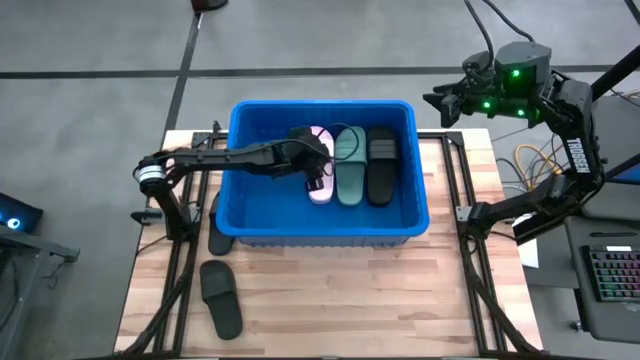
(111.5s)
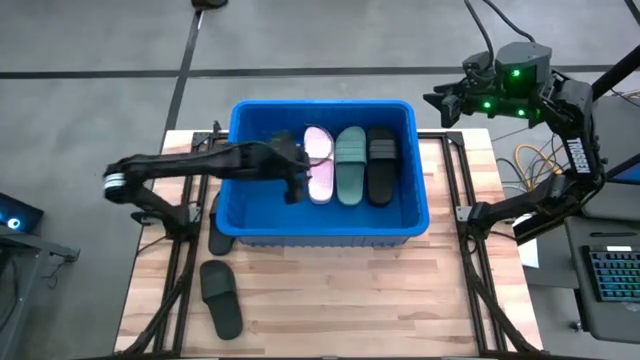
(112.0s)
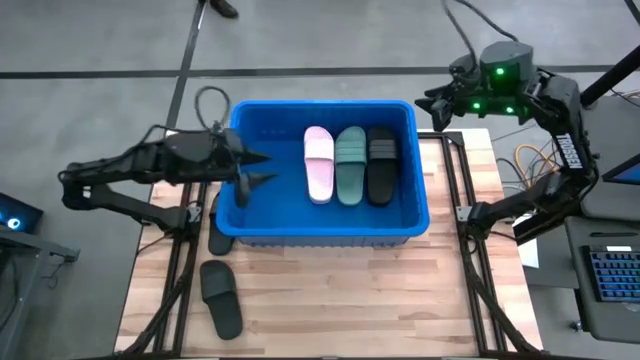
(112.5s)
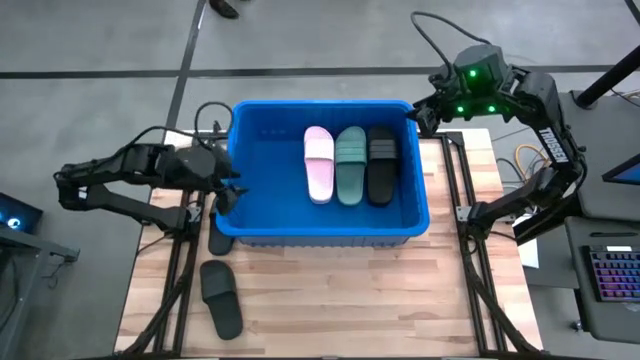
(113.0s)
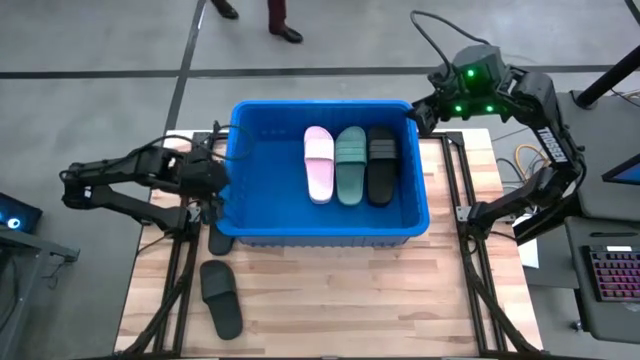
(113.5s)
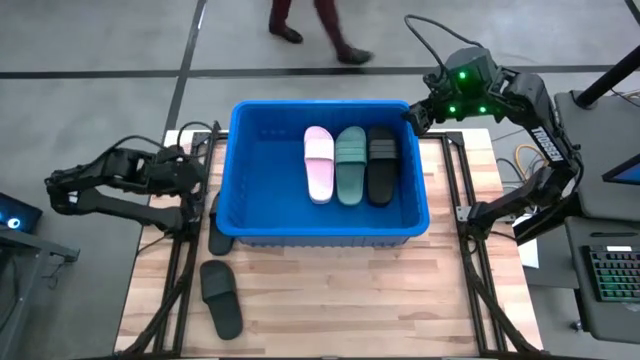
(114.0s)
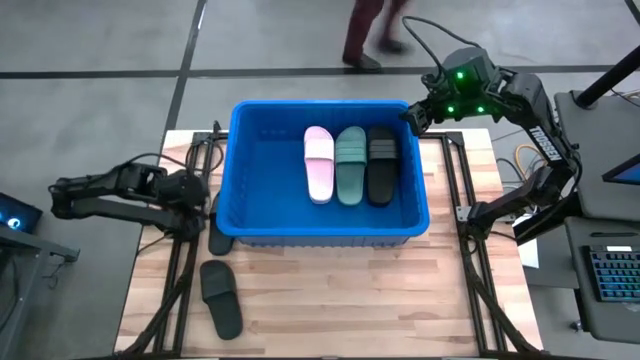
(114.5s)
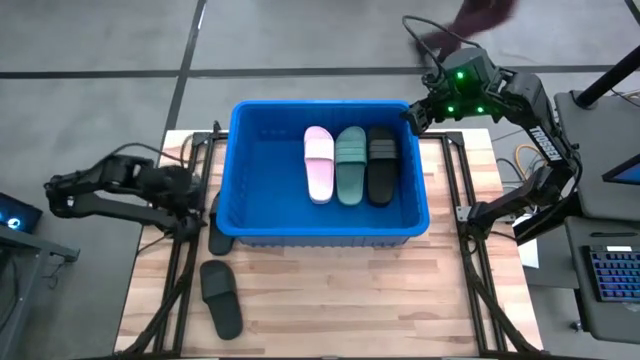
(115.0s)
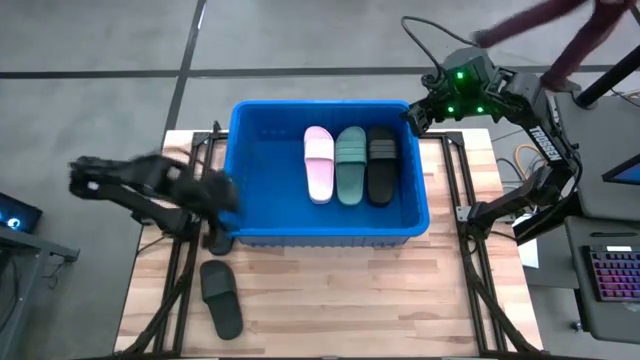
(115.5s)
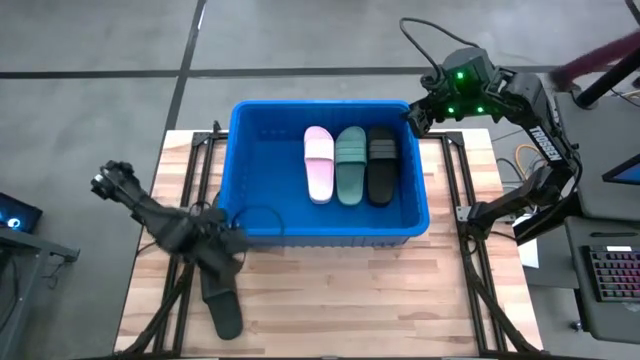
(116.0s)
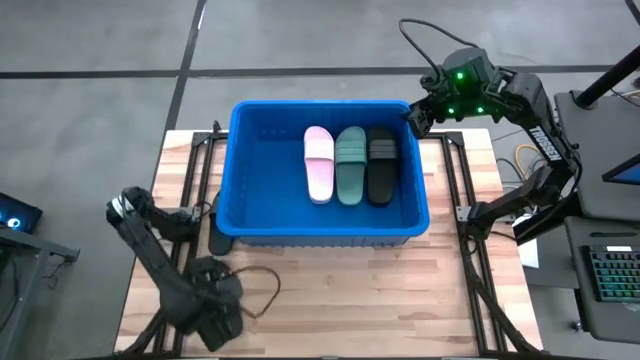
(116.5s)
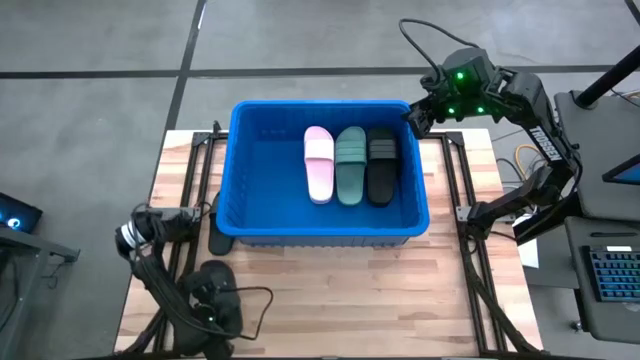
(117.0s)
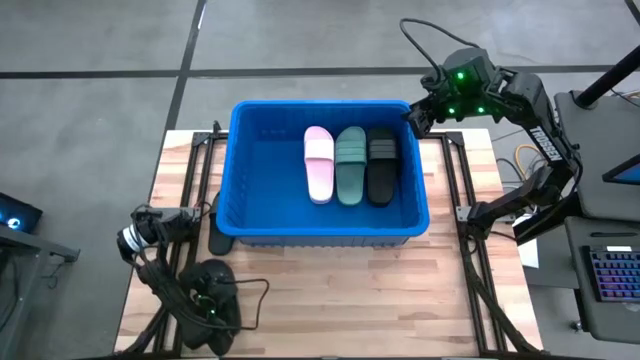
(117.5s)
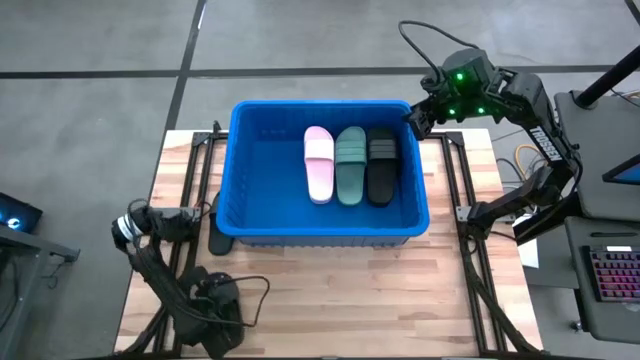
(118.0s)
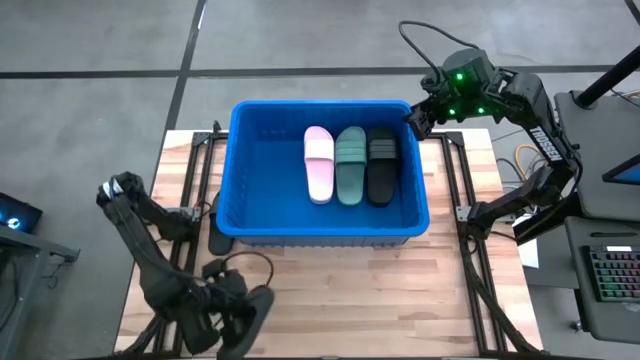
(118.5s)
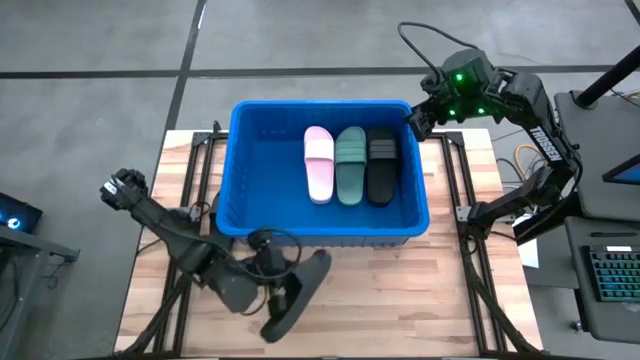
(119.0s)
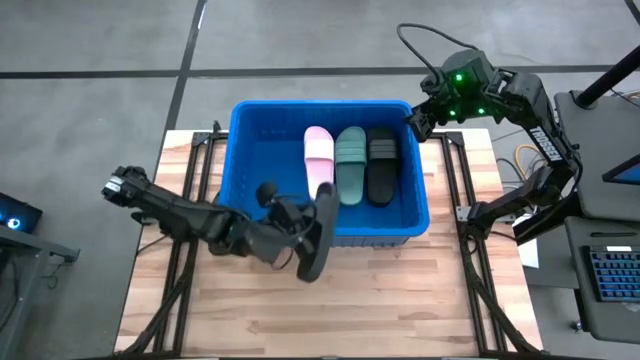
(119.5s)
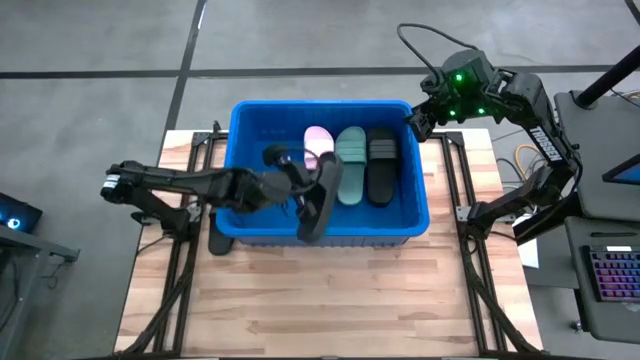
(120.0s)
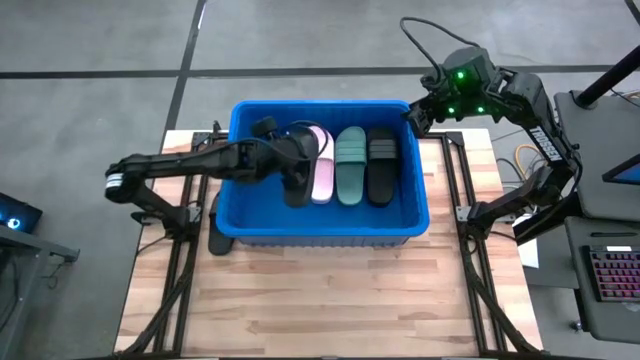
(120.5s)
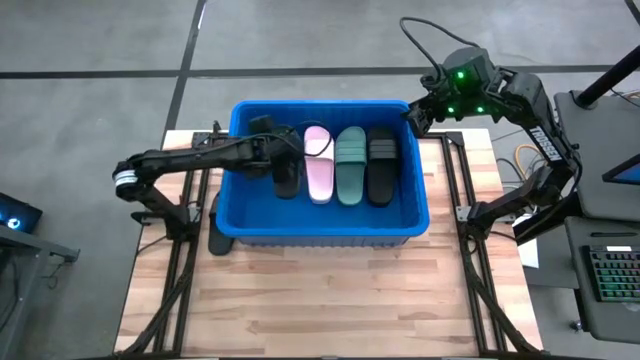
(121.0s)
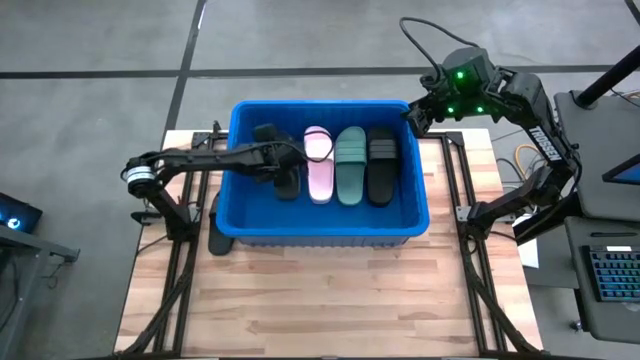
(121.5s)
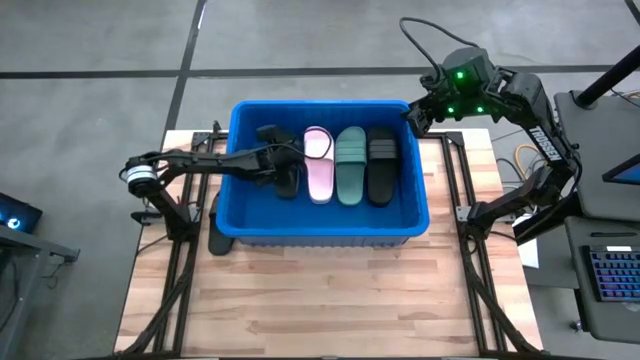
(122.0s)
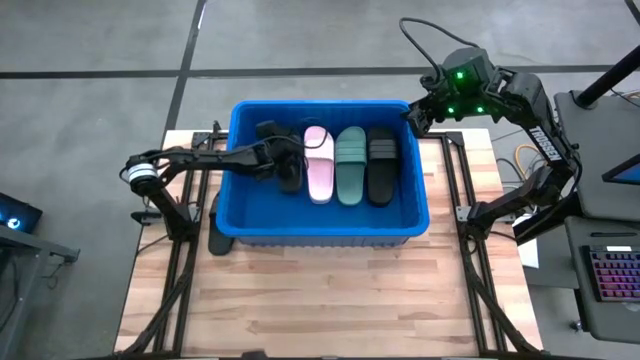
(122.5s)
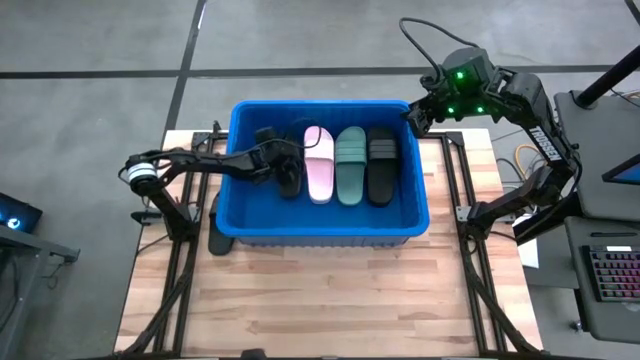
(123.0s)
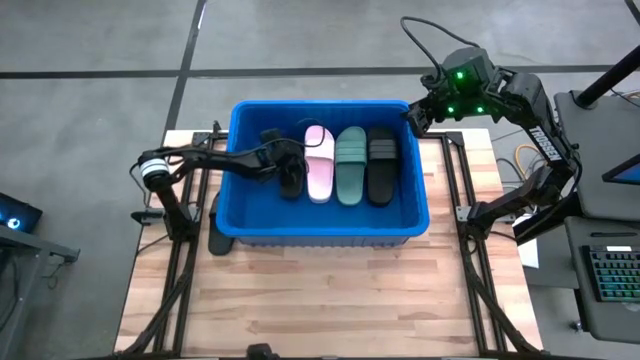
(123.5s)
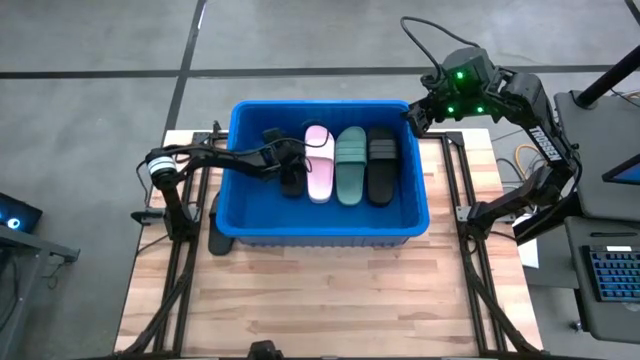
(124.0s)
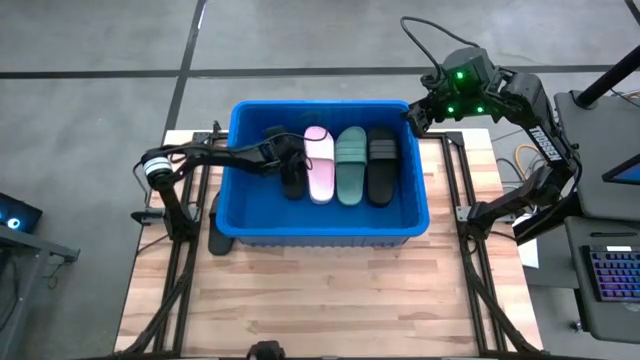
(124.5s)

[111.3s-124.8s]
Task: Pick and place slides into bin
Put the black slide into the blue bin

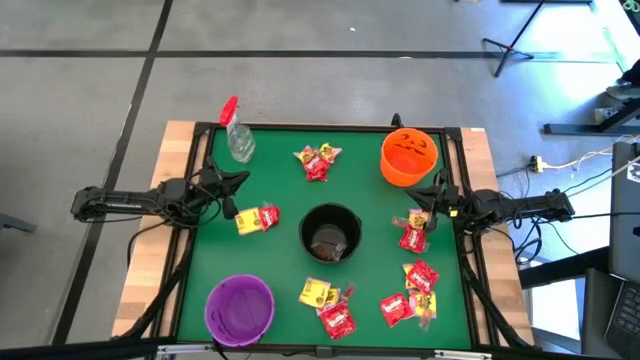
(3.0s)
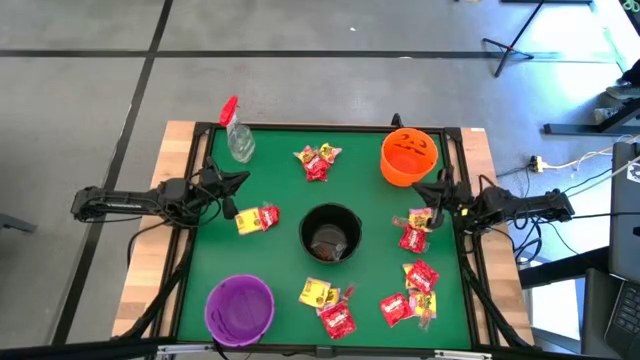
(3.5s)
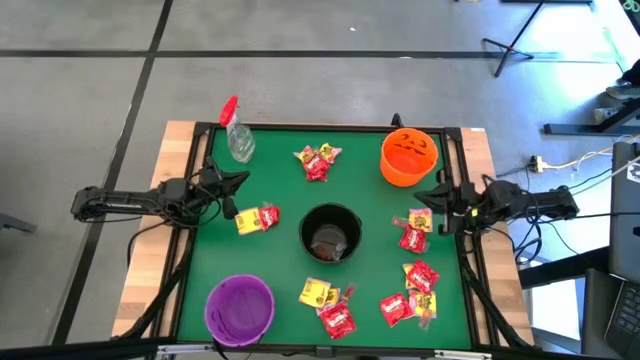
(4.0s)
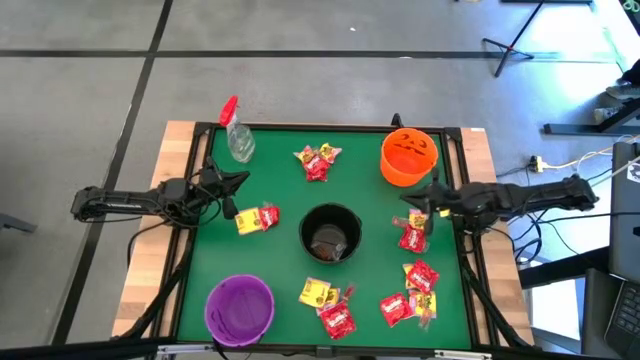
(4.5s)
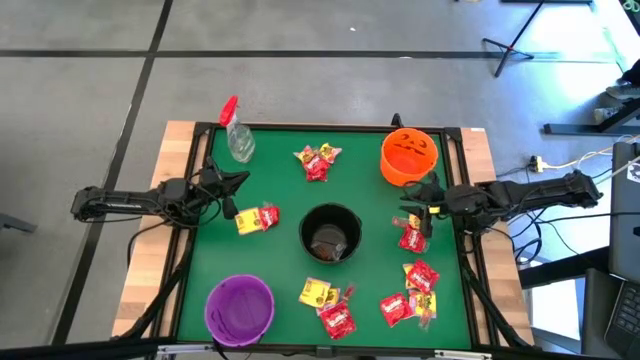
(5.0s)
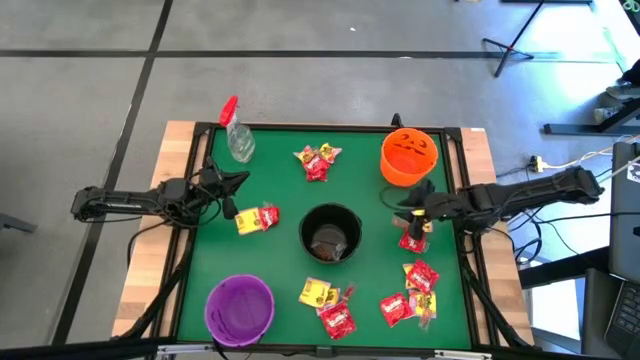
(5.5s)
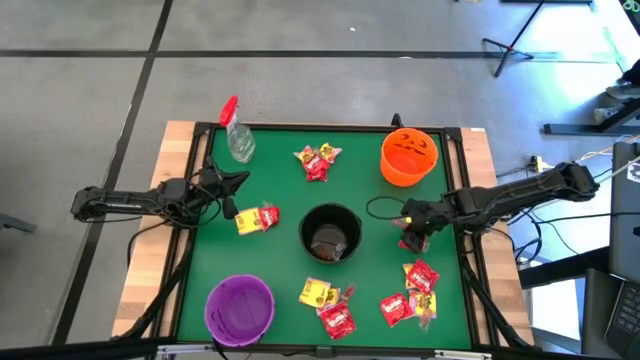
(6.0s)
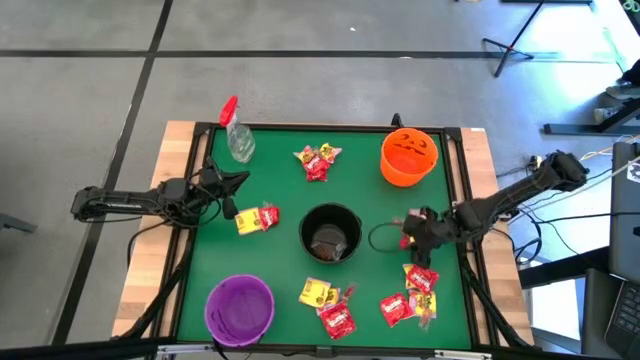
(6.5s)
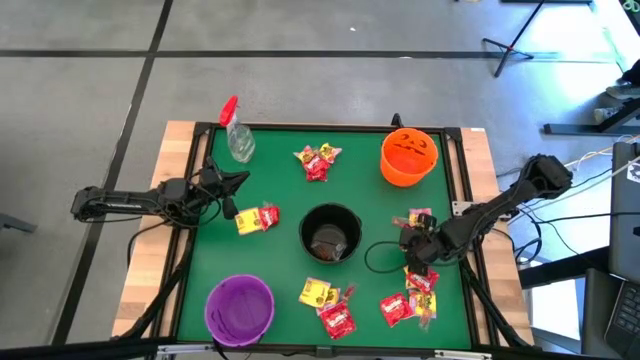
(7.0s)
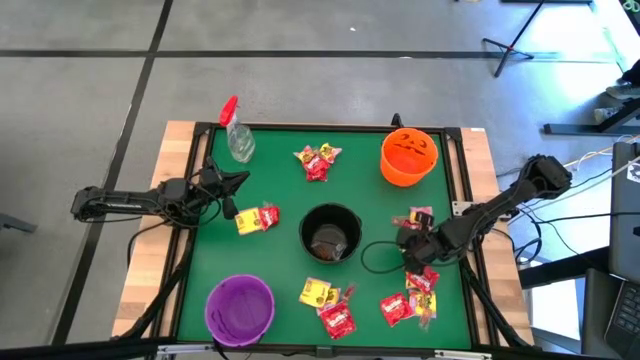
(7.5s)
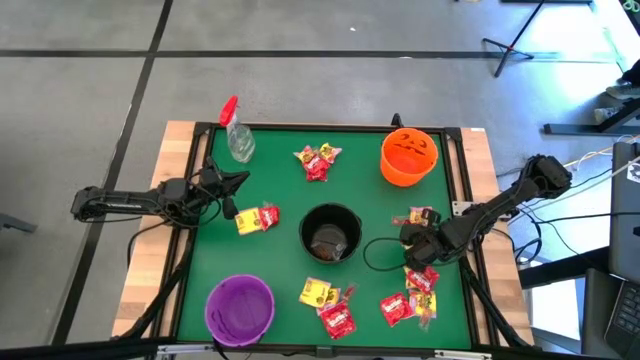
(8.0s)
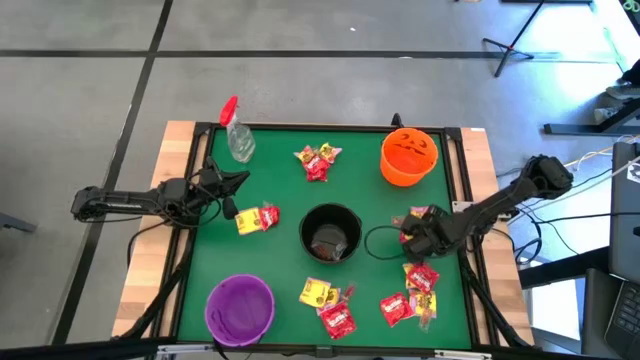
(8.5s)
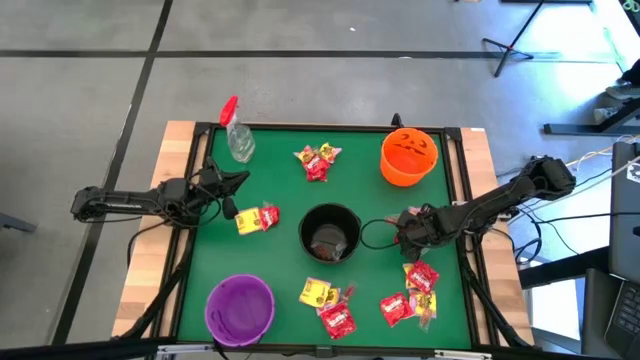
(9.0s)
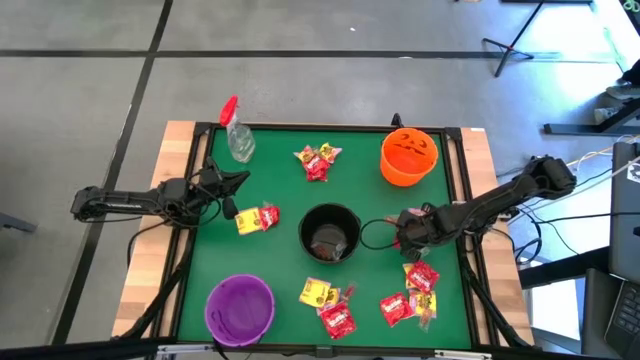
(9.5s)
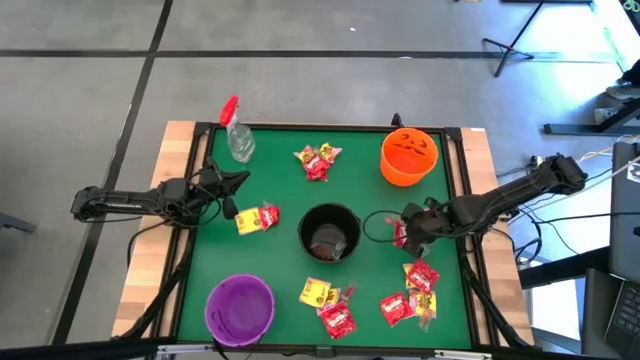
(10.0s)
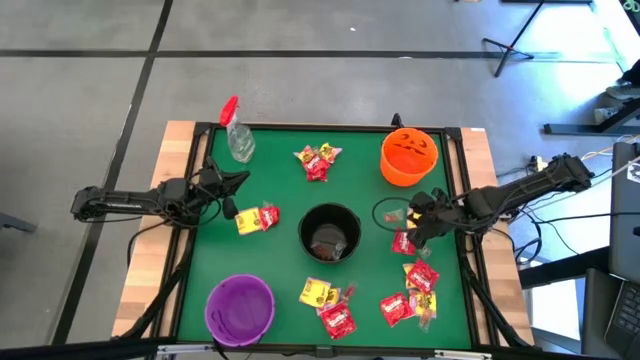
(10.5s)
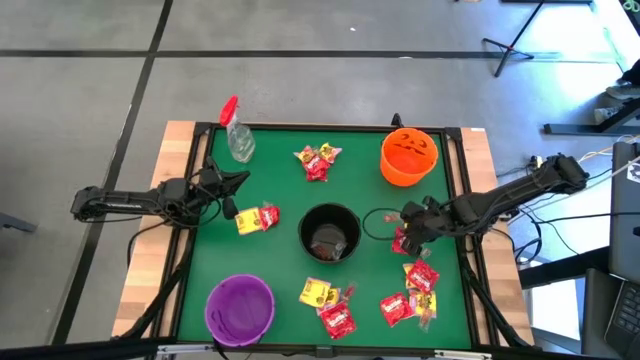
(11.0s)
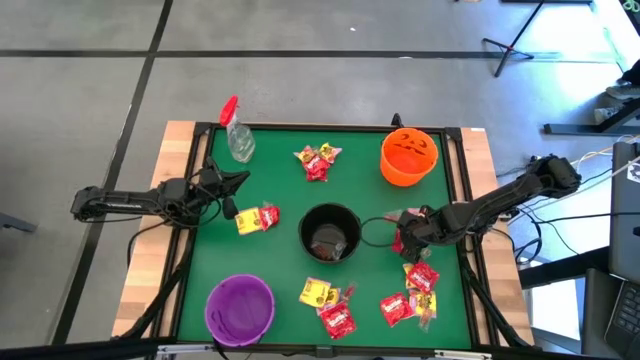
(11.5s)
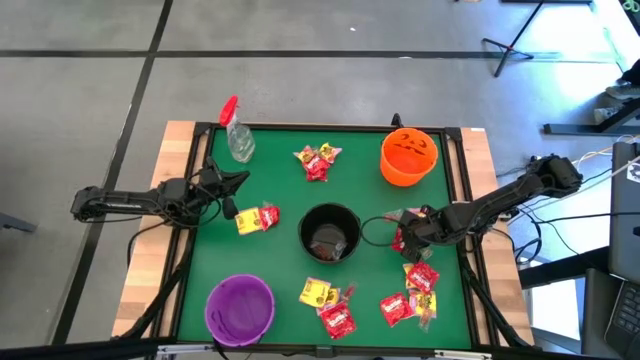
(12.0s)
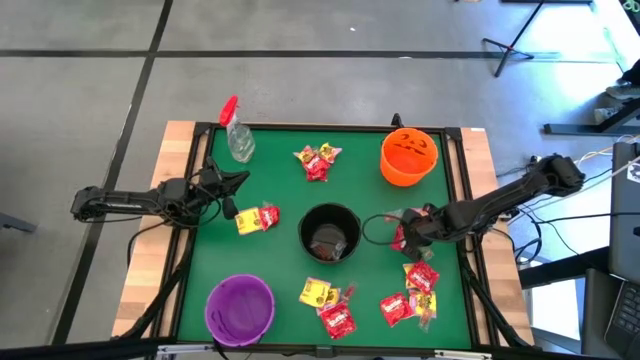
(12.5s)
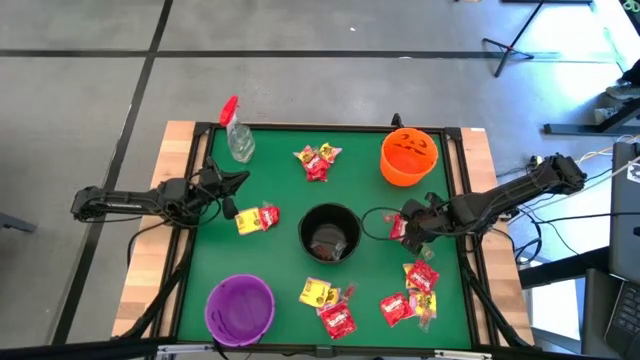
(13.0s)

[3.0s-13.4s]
Task: Sort candy
Put the red candy into the orange bucket
